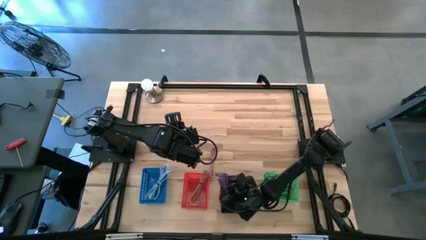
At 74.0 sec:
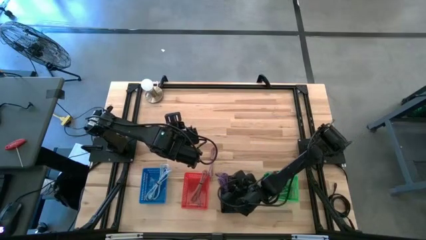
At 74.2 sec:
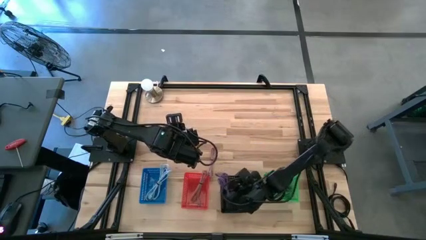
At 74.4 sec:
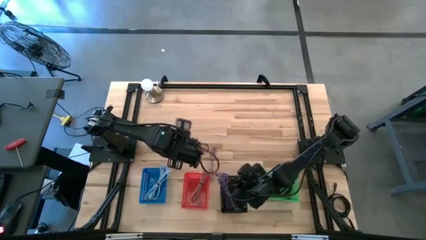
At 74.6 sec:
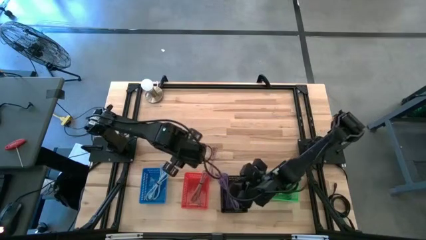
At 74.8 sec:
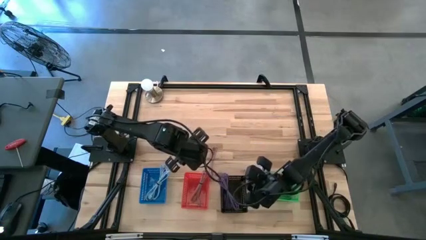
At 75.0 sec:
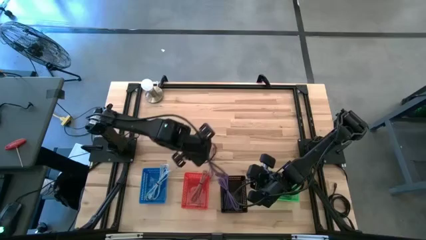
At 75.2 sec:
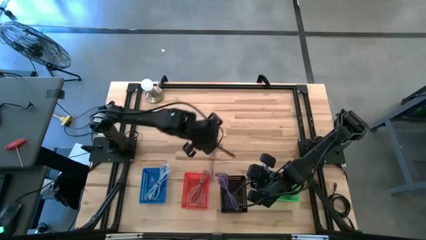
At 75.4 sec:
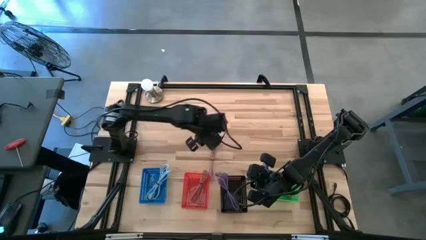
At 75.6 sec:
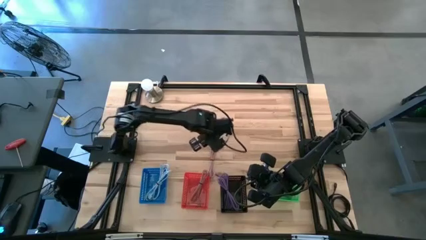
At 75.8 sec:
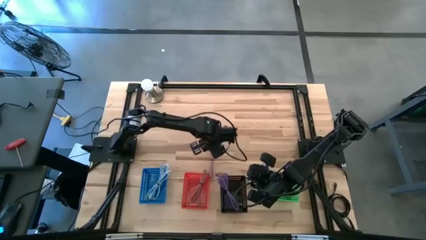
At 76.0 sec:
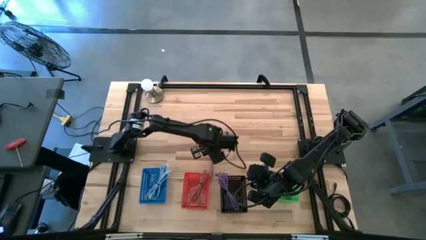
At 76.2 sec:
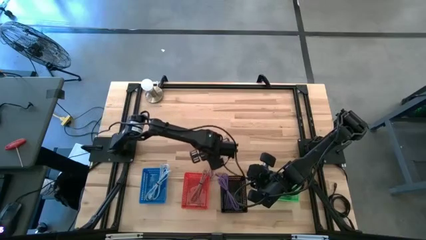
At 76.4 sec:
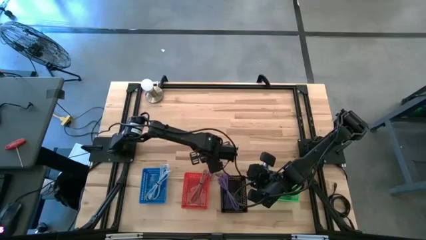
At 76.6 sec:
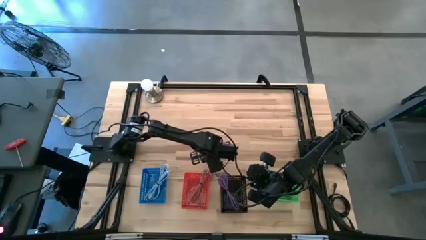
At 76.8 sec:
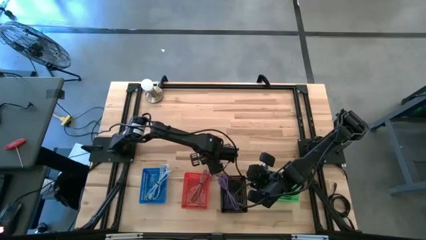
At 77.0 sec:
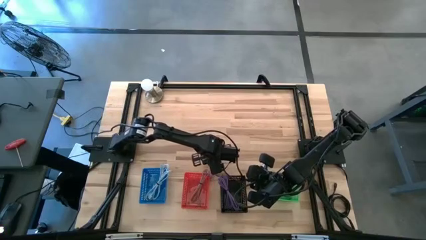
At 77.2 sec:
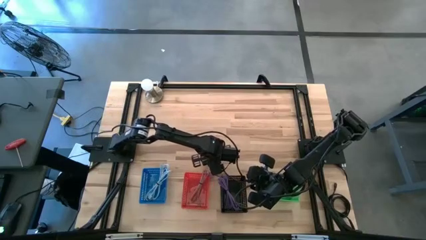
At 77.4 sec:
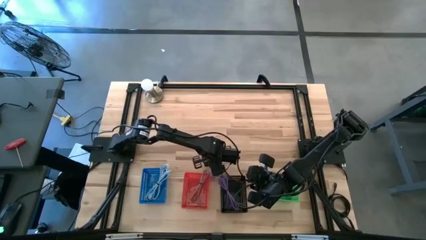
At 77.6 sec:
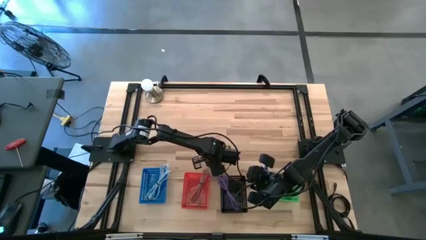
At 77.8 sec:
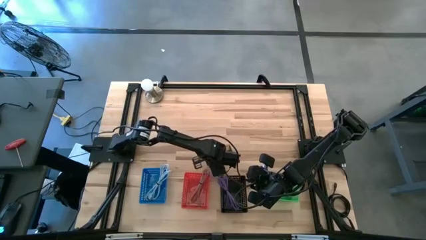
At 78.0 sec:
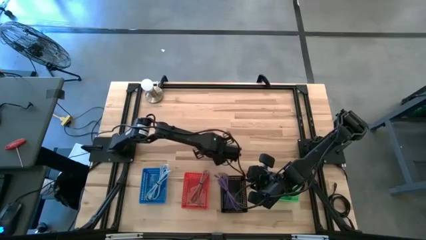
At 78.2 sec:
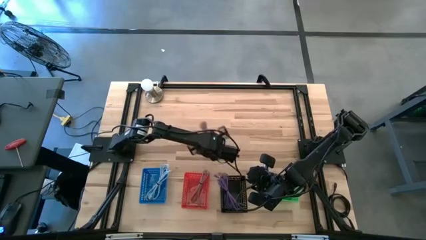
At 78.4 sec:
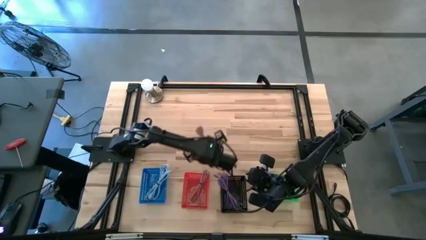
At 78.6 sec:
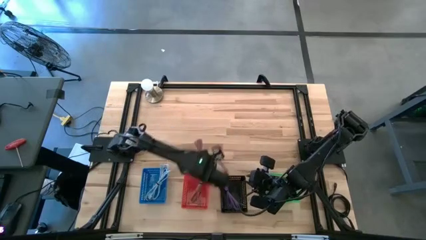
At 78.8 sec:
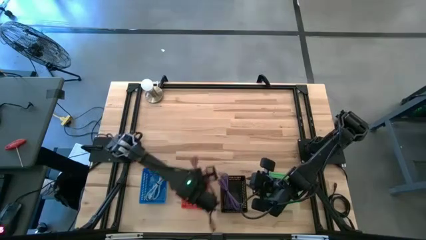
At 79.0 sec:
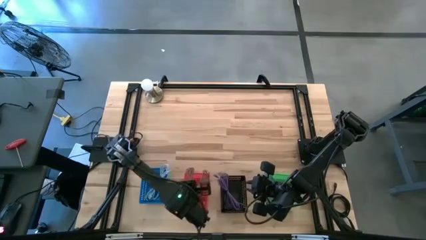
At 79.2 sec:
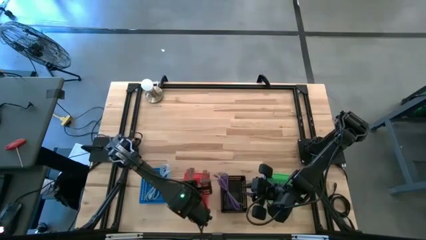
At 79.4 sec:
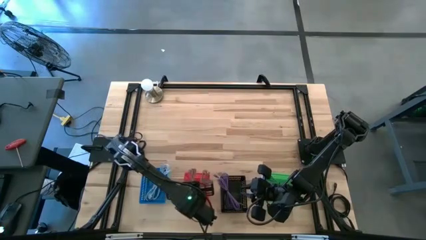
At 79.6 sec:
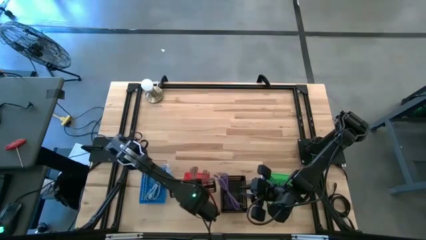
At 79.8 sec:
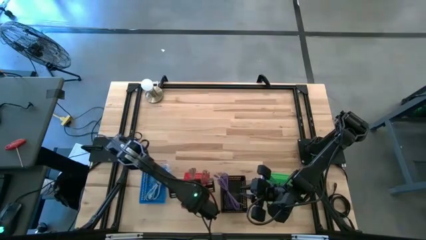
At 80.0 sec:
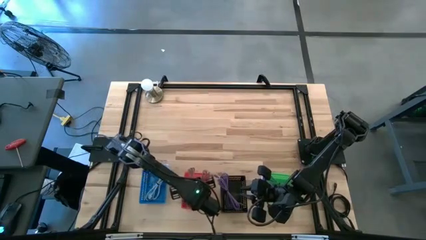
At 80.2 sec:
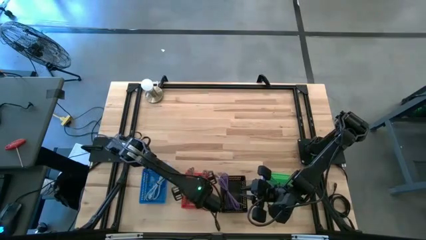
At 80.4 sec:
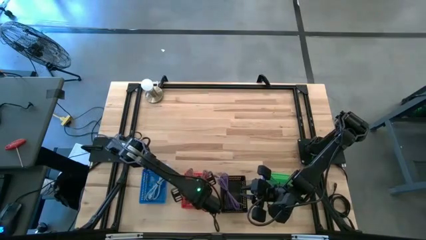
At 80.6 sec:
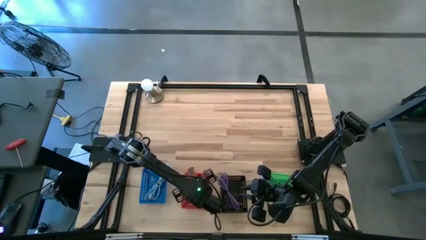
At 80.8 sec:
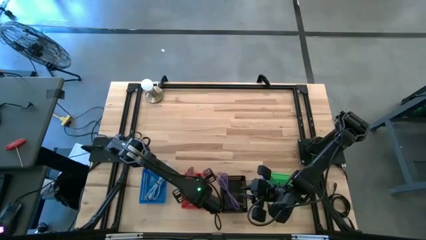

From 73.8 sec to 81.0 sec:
Task: Pick & Place USB Port
Put the pink charger cable into the red bin

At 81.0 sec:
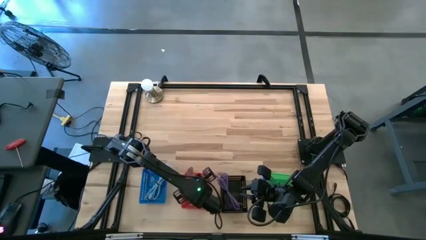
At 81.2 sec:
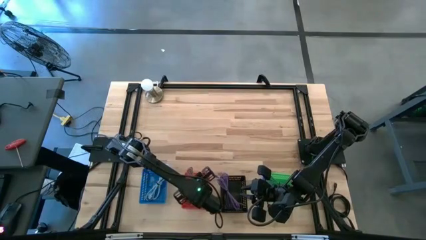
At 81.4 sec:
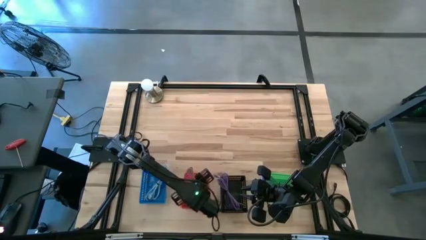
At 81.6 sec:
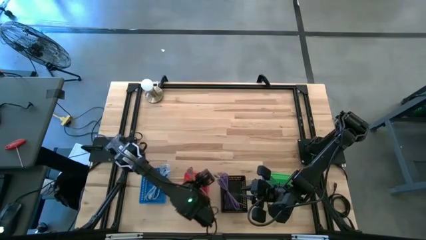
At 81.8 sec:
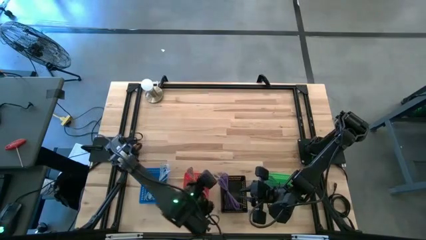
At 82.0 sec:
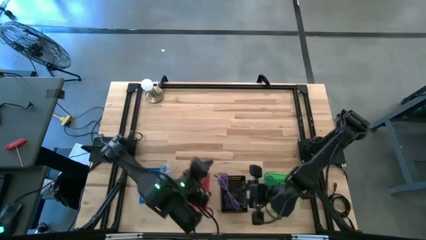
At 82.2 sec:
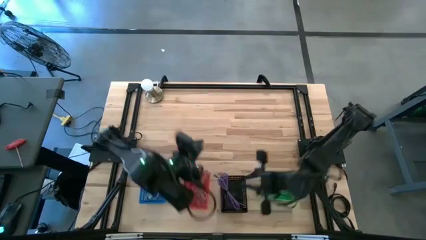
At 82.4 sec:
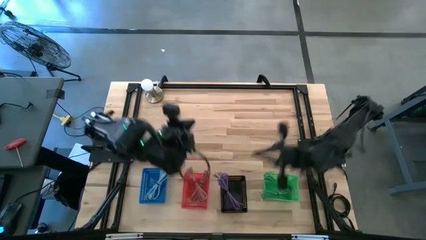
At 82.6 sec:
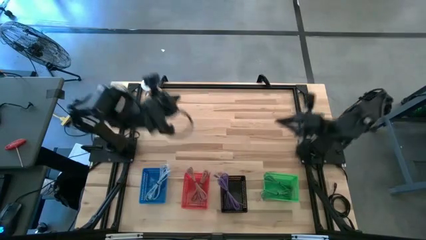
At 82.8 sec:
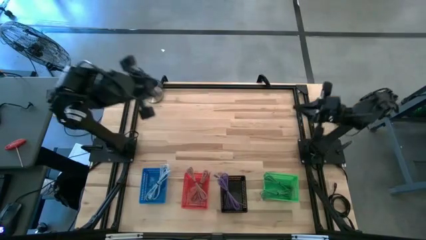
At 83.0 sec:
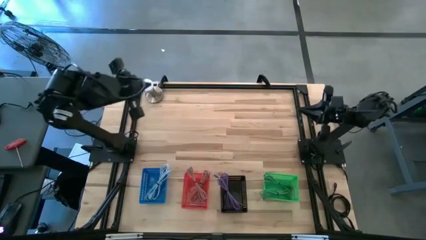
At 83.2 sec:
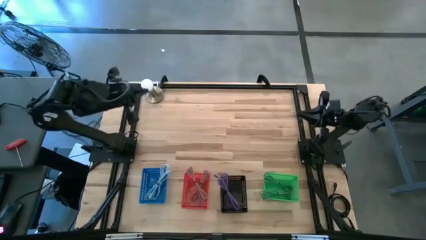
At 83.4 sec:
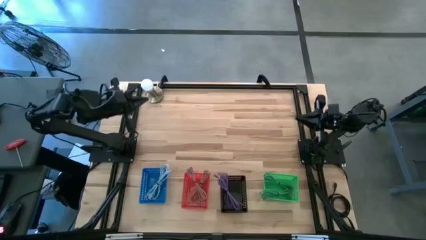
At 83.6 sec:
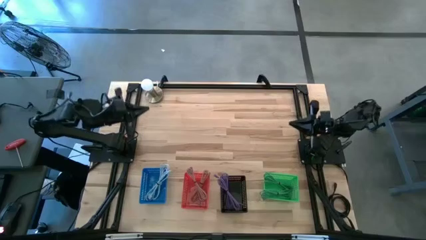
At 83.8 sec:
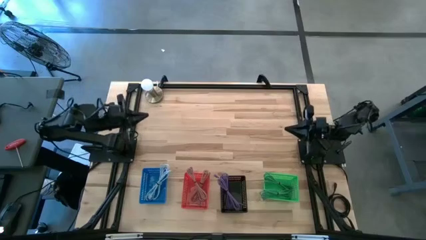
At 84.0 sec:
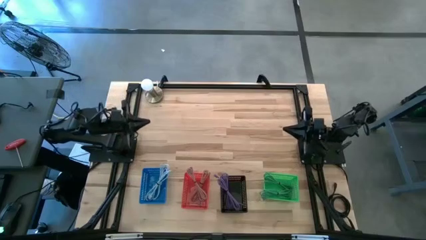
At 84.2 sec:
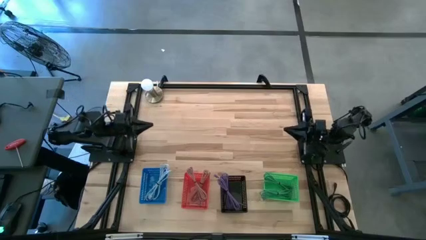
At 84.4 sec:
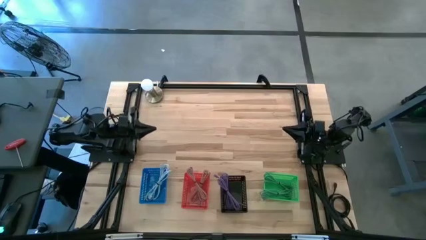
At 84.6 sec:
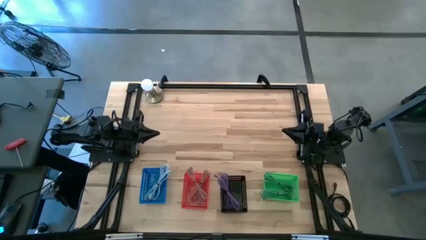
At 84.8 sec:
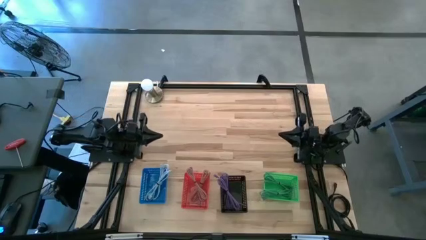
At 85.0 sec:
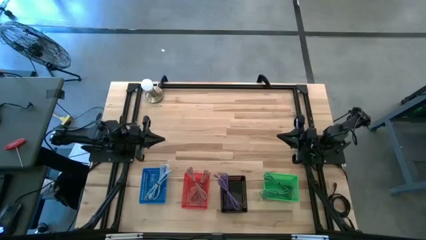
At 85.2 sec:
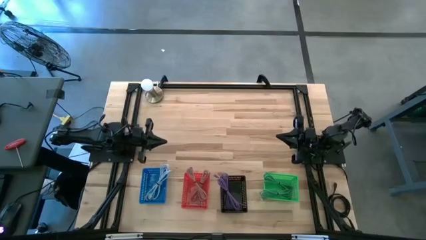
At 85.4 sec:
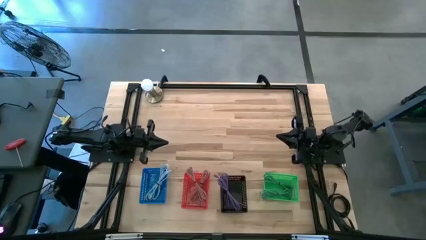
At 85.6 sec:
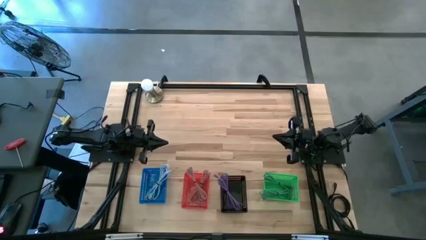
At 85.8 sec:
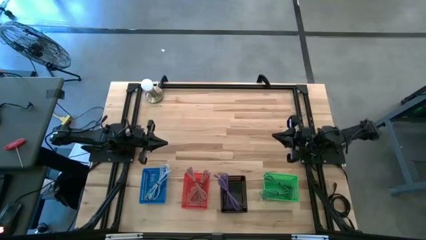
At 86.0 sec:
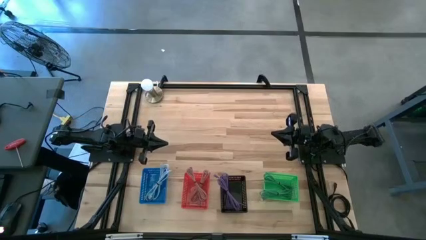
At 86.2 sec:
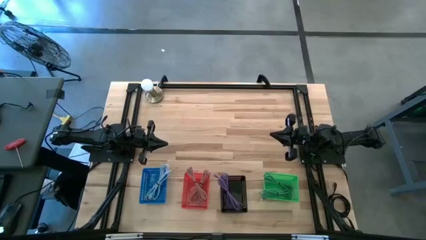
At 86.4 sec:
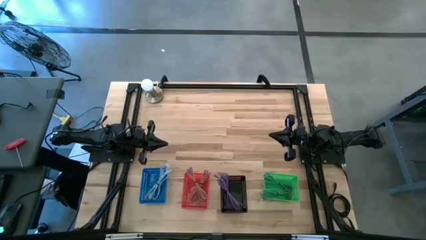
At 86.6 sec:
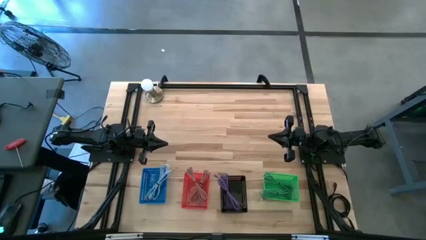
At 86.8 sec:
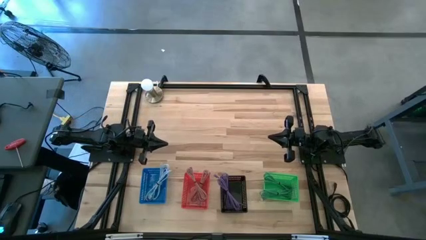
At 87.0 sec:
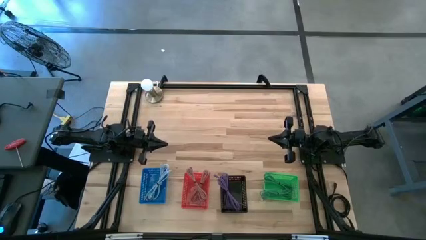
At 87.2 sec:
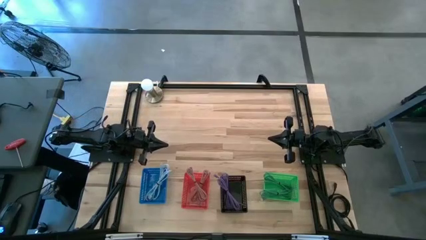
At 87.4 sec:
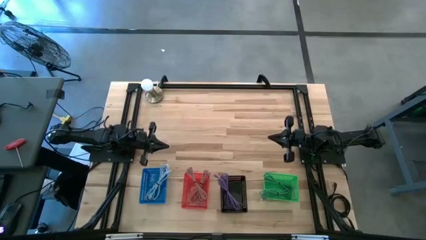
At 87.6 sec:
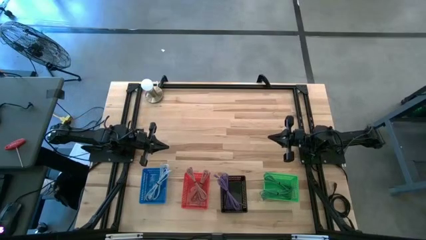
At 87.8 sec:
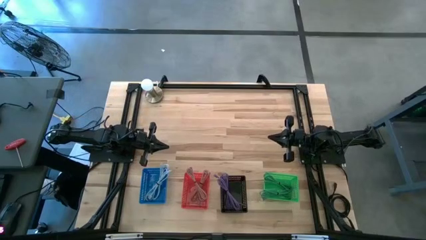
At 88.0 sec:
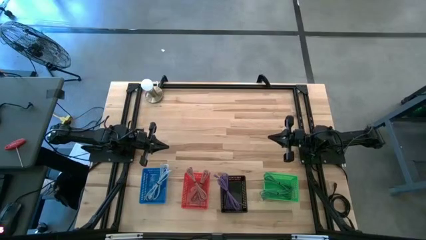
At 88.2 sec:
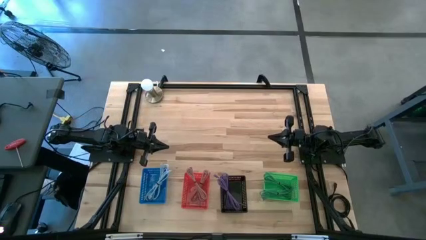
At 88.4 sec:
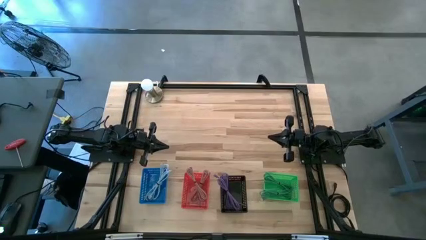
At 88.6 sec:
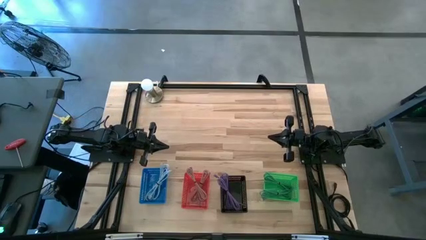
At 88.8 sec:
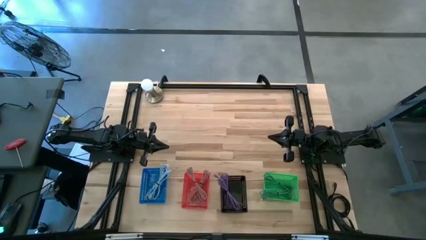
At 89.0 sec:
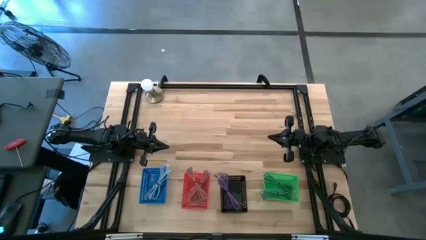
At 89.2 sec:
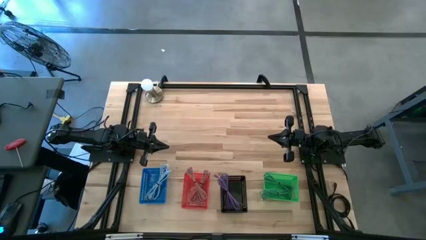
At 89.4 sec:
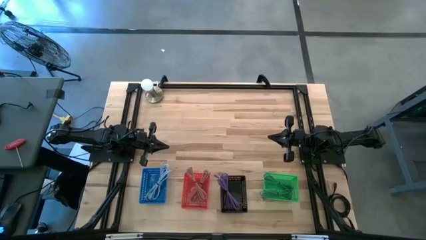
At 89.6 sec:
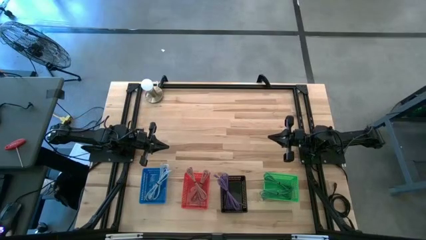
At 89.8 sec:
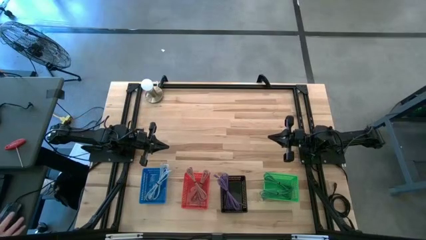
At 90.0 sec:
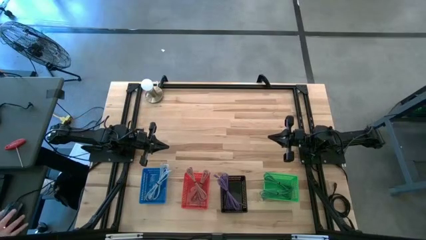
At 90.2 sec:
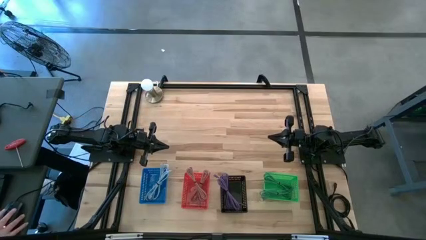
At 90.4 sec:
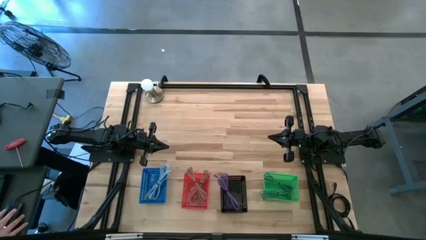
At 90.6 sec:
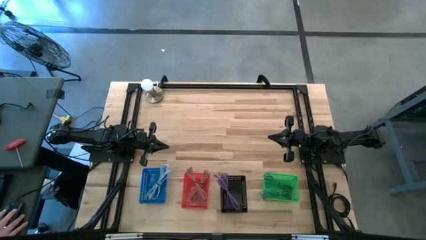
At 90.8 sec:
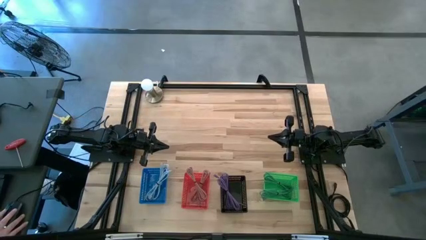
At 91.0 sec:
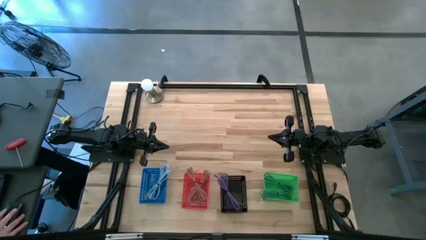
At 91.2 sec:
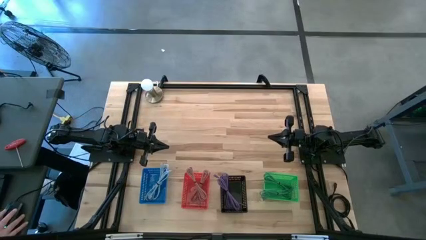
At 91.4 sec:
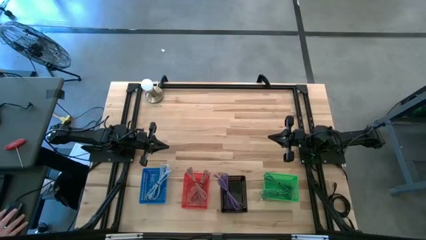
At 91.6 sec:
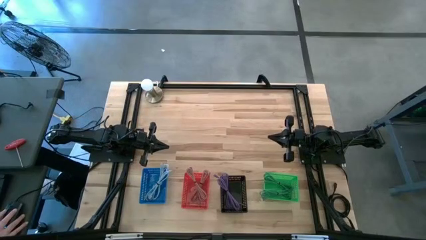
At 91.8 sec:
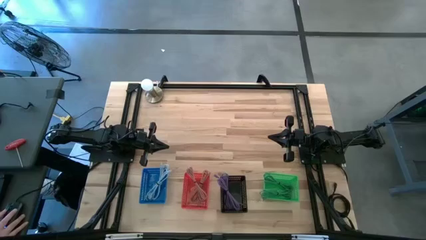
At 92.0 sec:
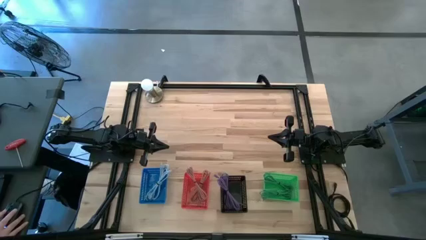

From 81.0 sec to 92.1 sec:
Return to Home Position
